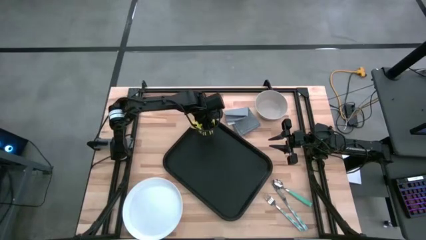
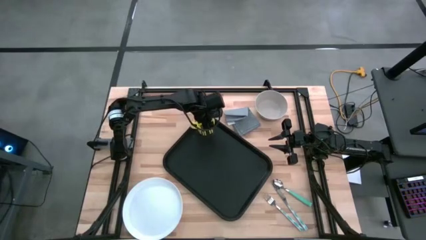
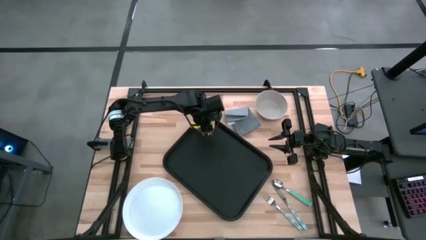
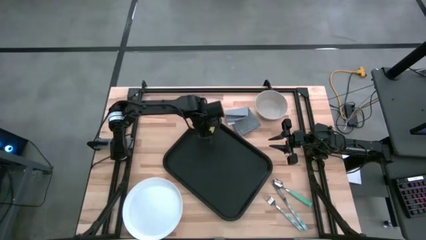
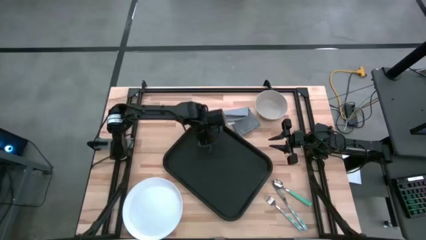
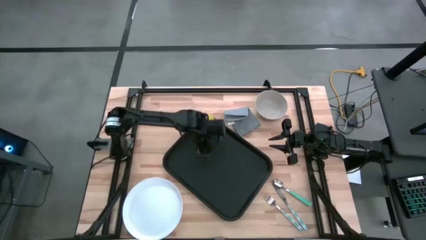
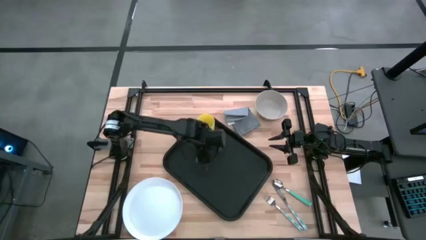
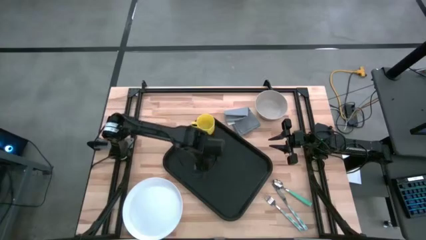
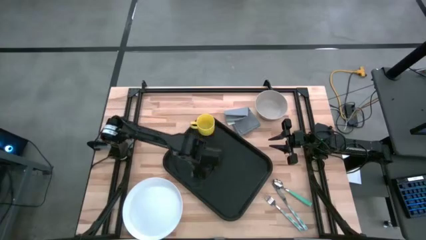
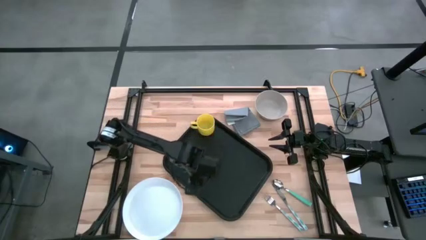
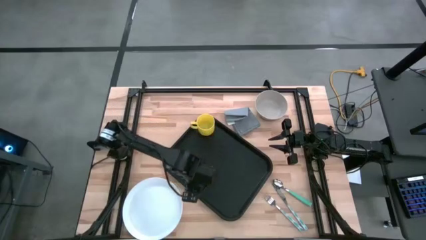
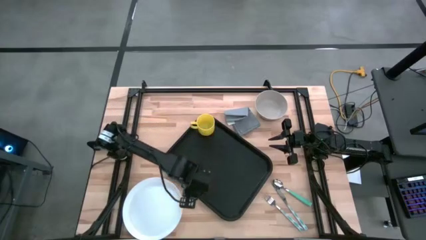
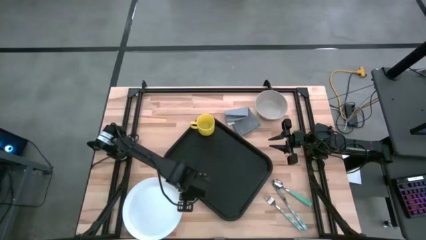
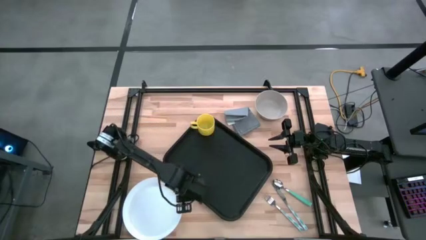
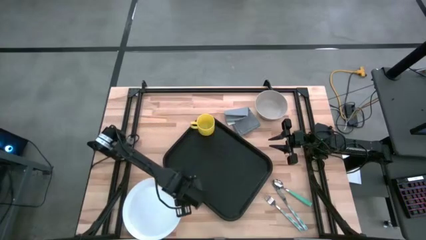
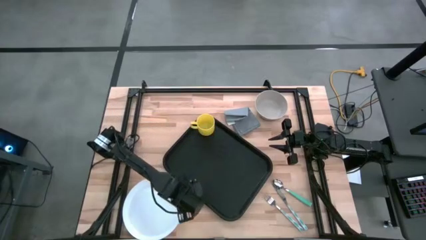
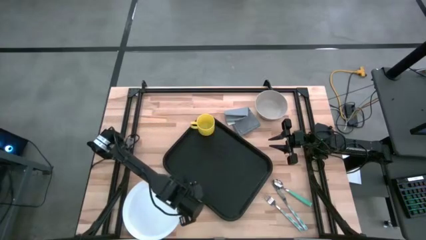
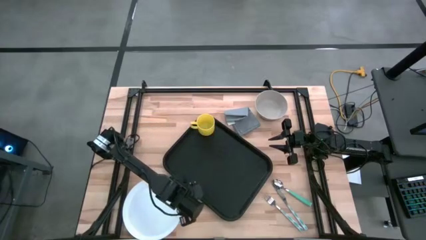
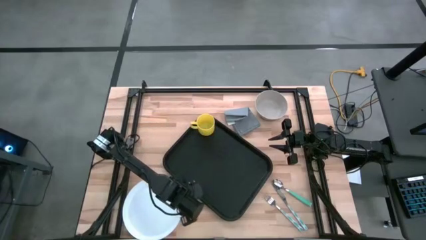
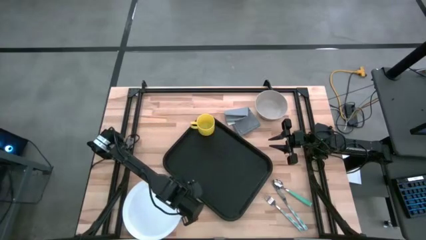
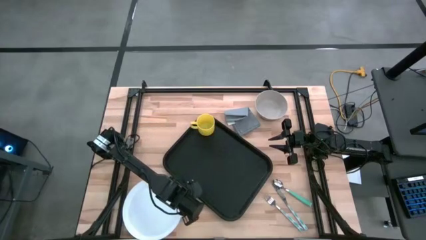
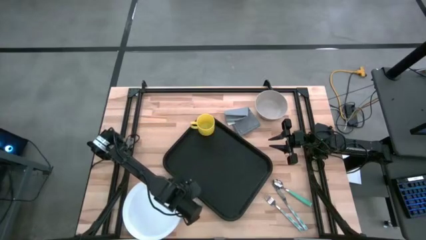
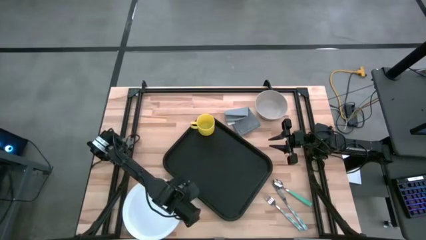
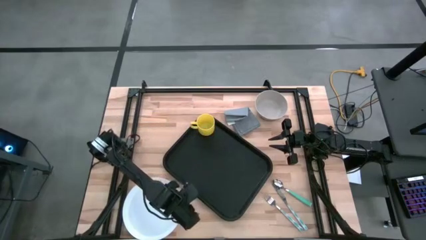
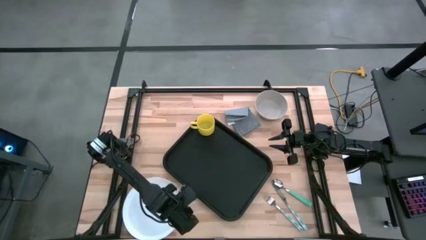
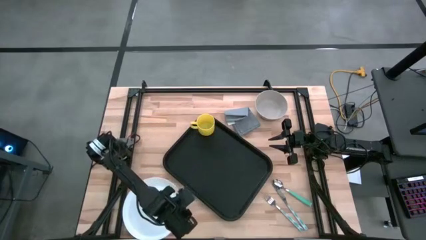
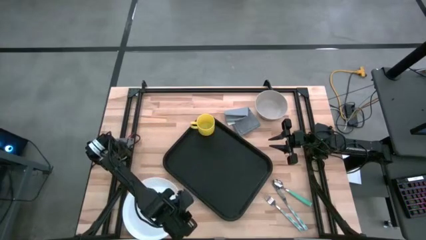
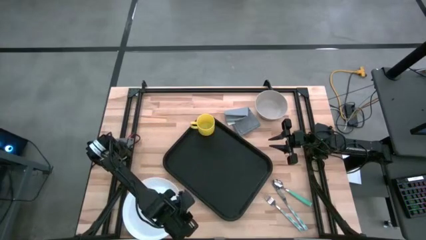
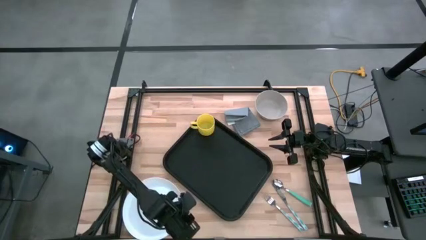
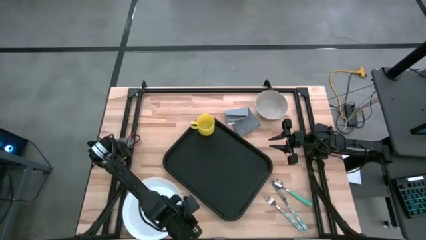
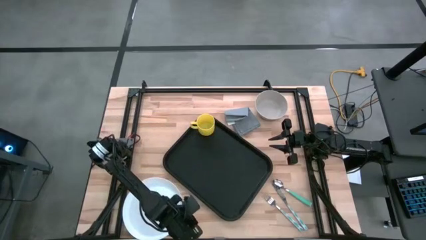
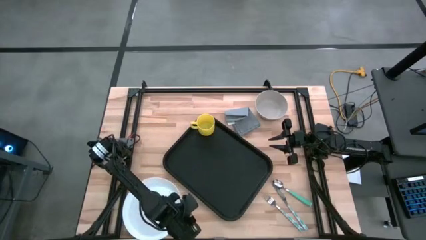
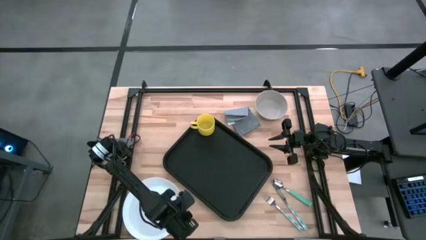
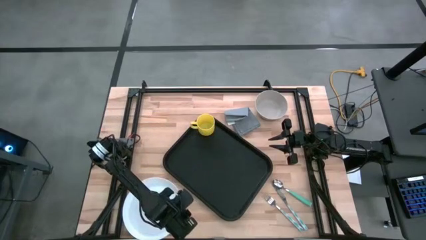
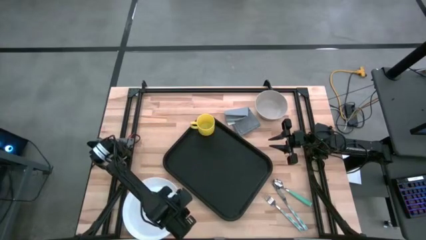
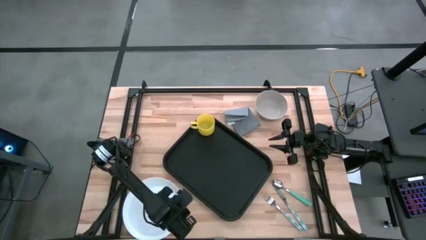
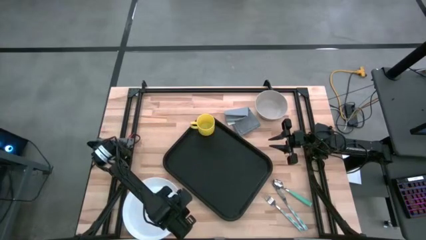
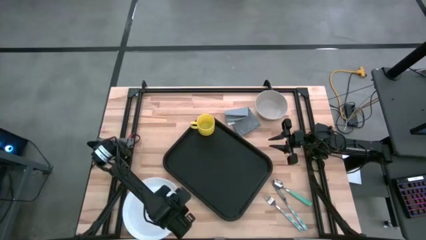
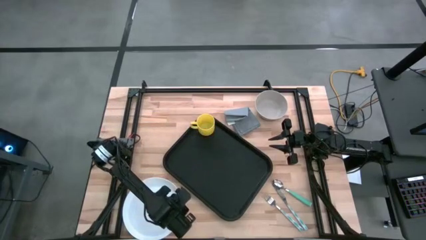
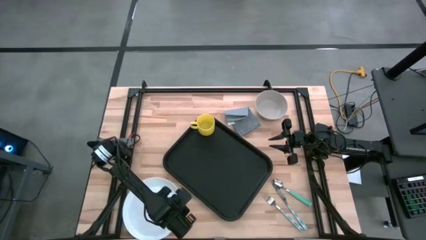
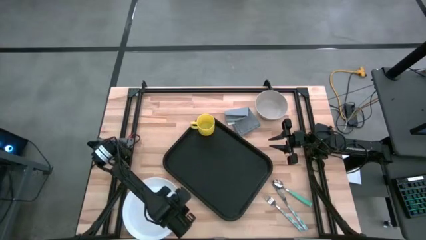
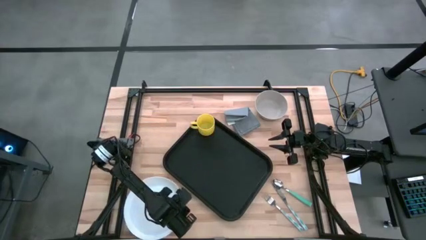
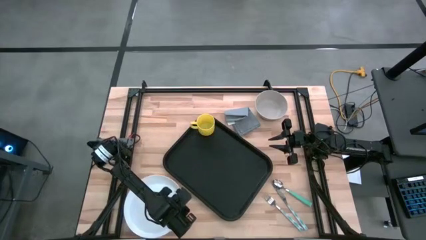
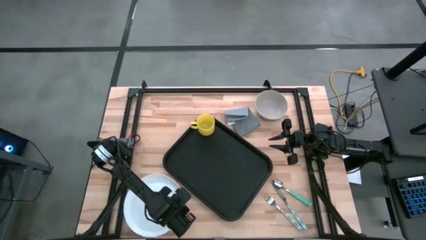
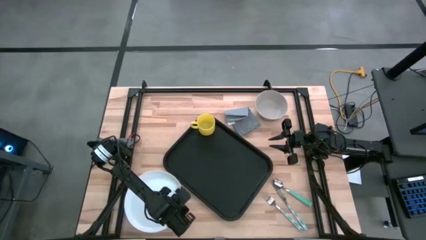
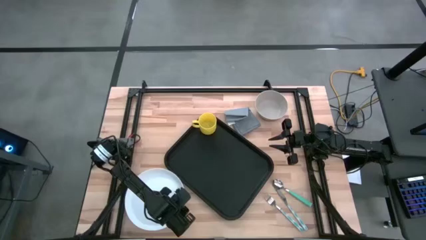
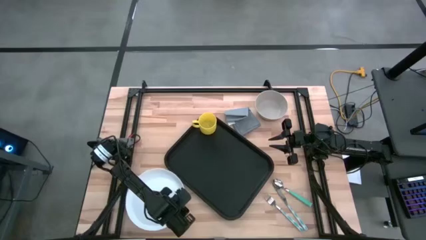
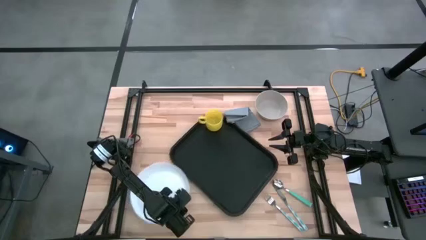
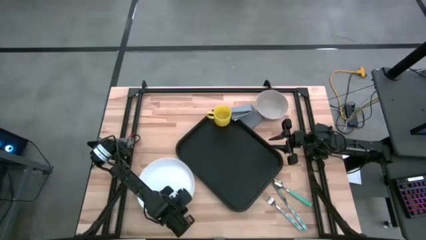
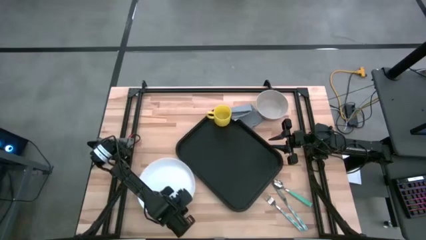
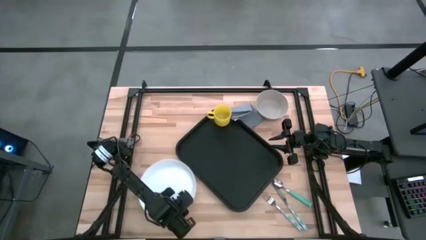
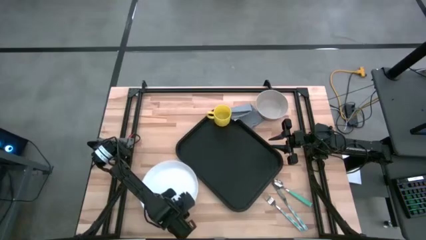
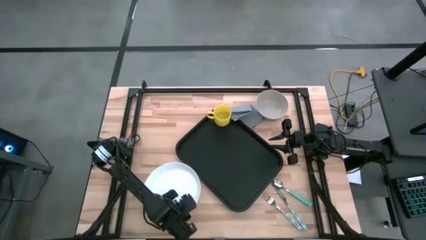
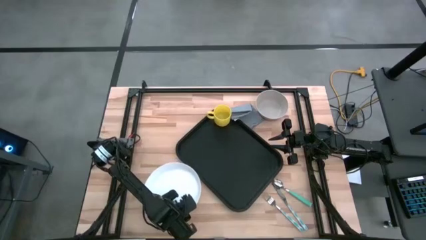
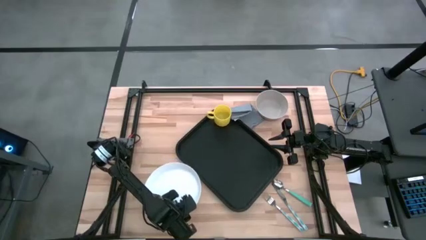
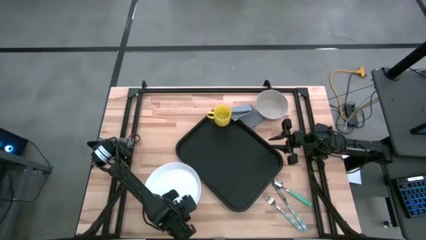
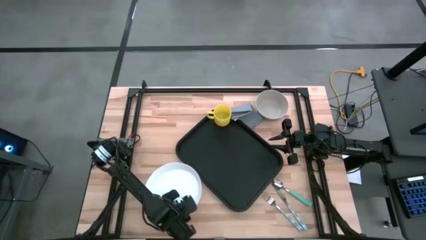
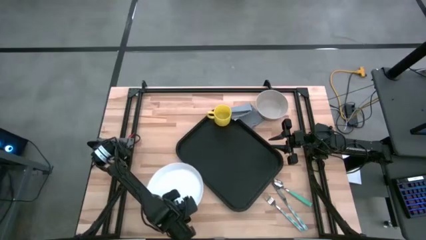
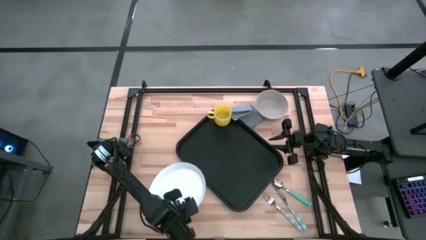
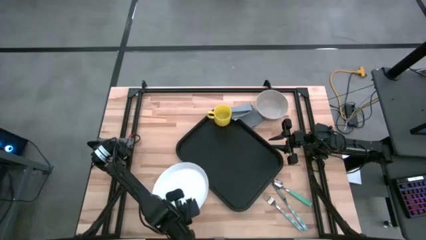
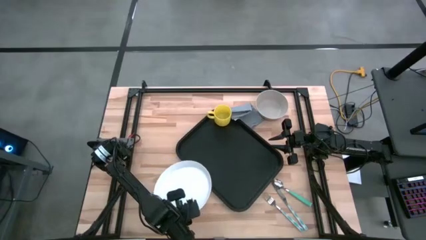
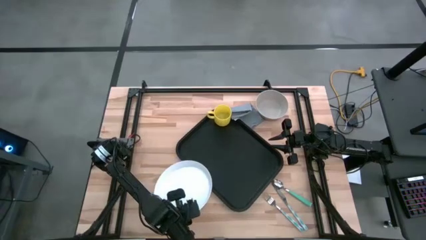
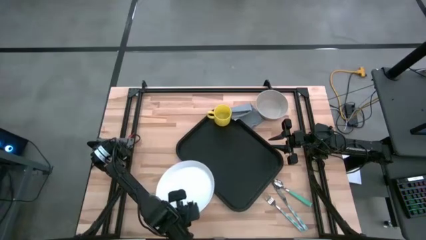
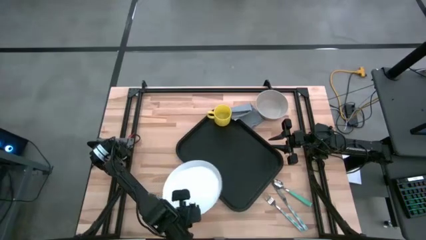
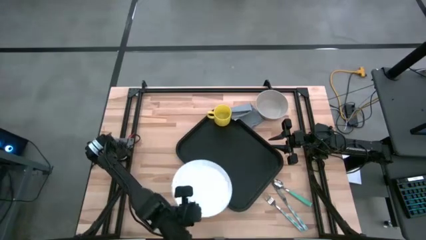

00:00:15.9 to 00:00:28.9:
Task: Set up tray
Put the white plate at the bottom of the yellow mug on the black serving tray
